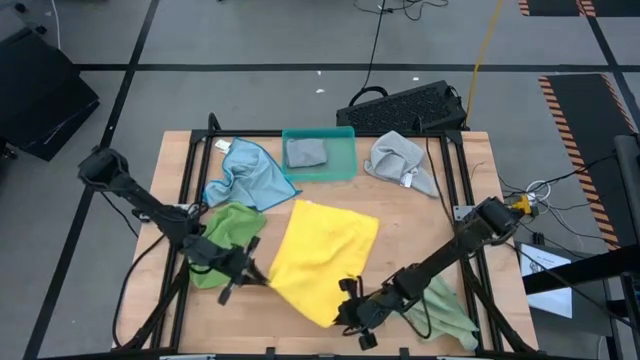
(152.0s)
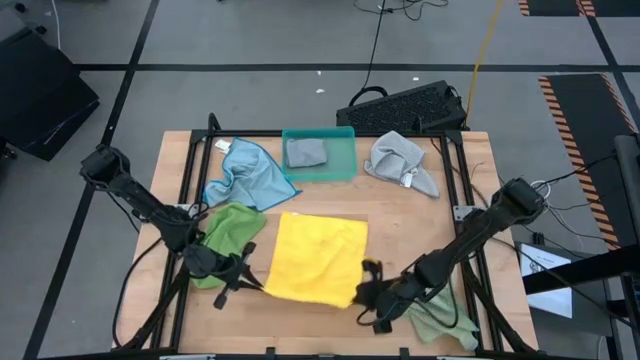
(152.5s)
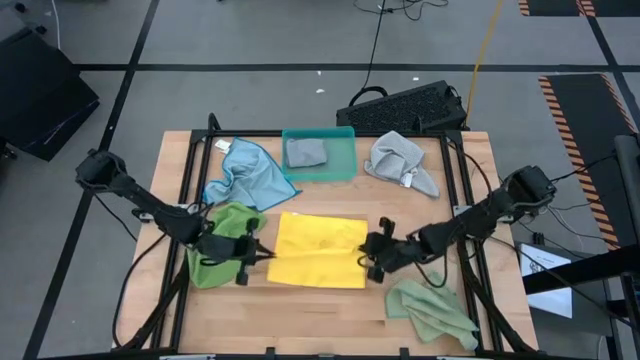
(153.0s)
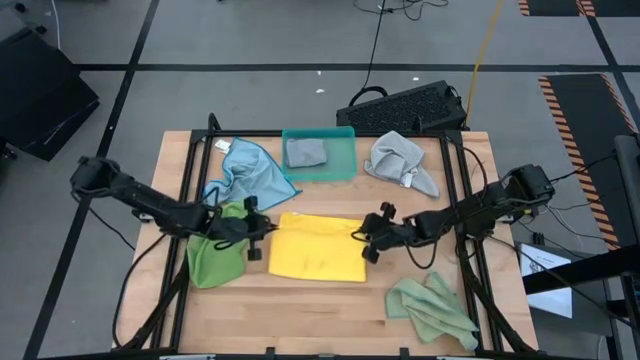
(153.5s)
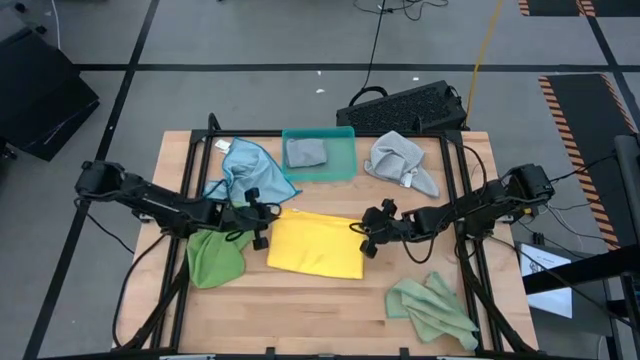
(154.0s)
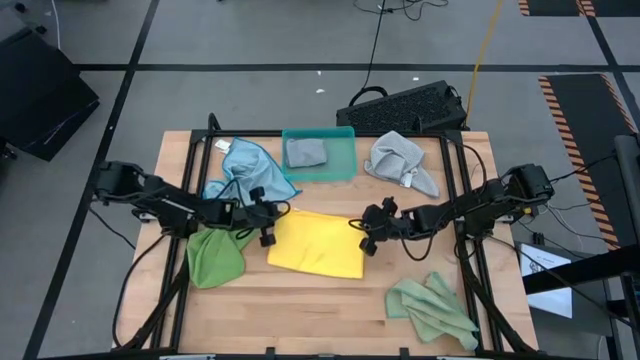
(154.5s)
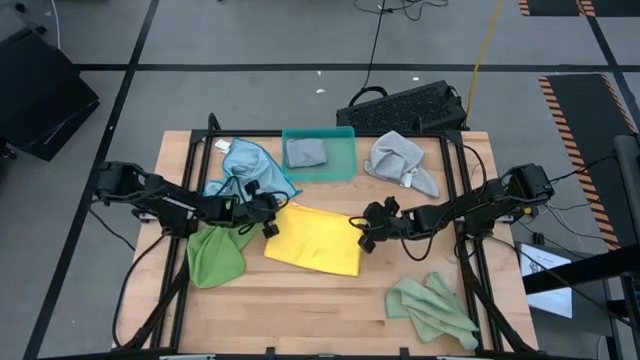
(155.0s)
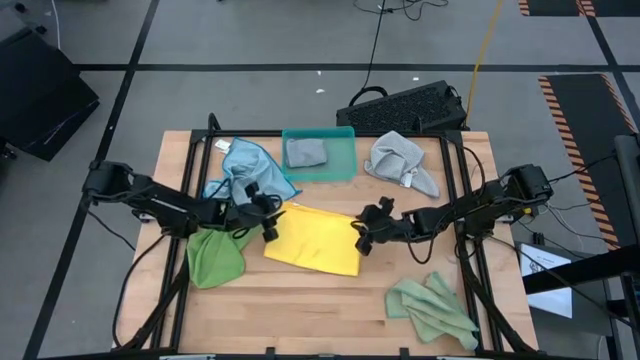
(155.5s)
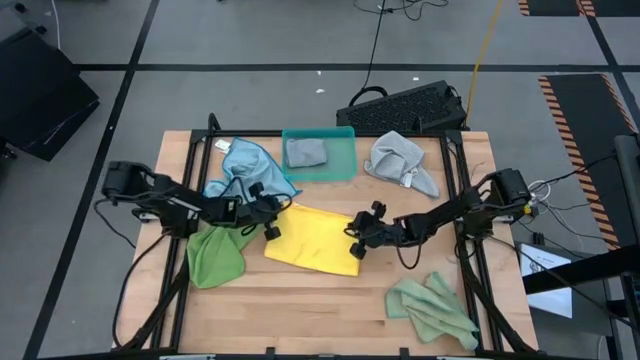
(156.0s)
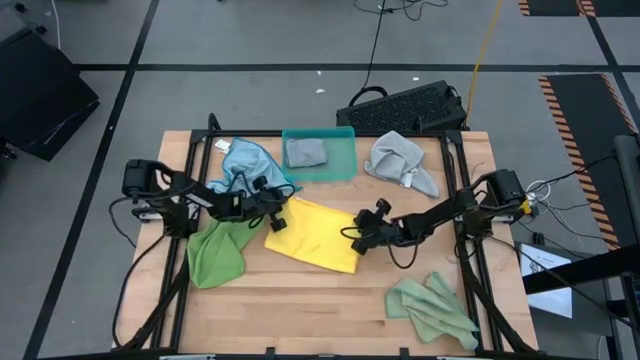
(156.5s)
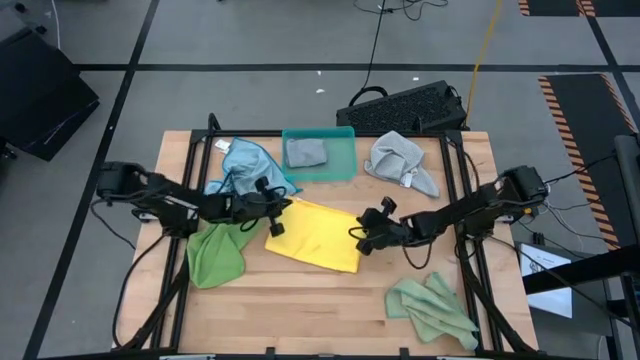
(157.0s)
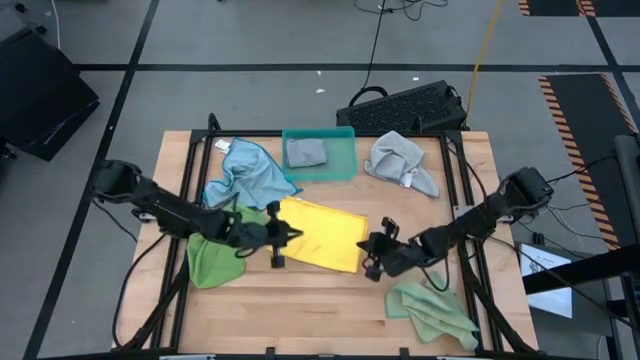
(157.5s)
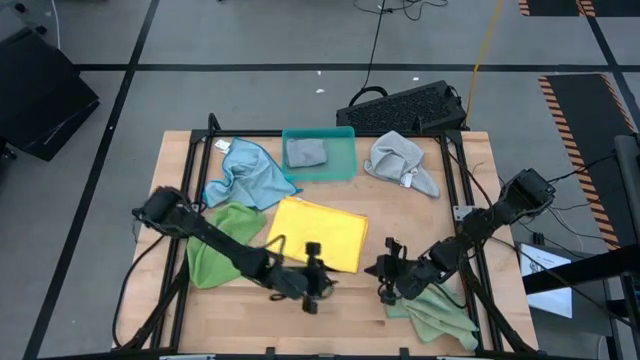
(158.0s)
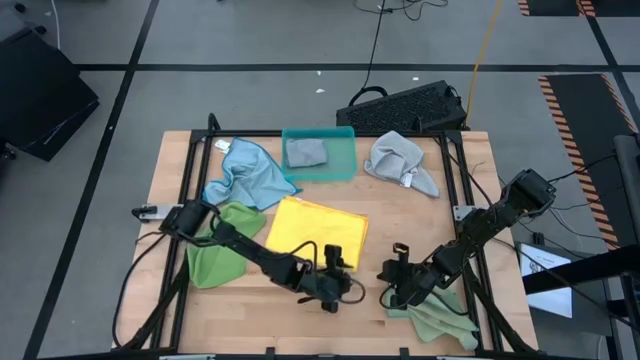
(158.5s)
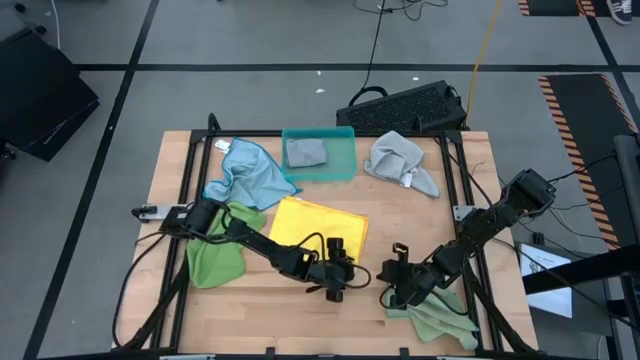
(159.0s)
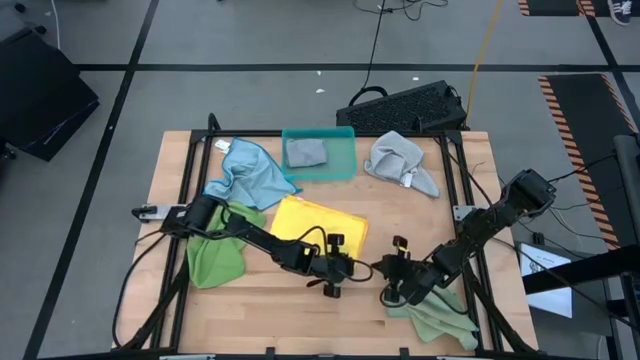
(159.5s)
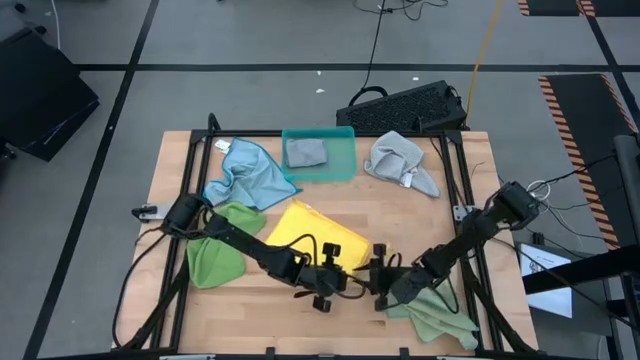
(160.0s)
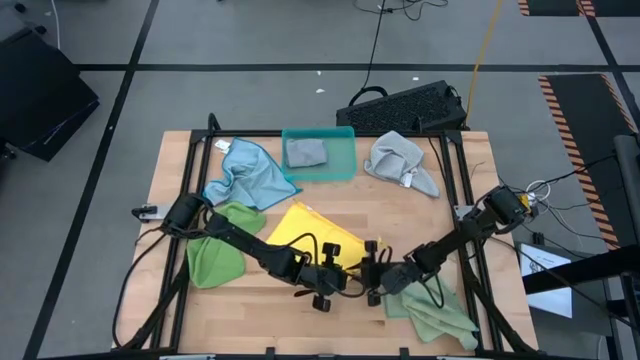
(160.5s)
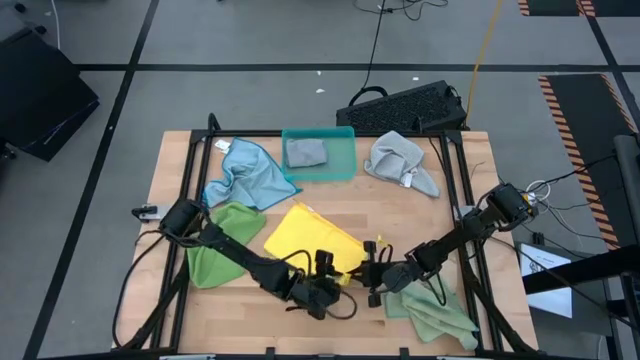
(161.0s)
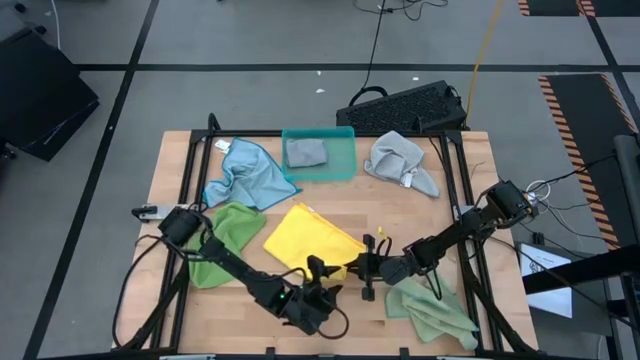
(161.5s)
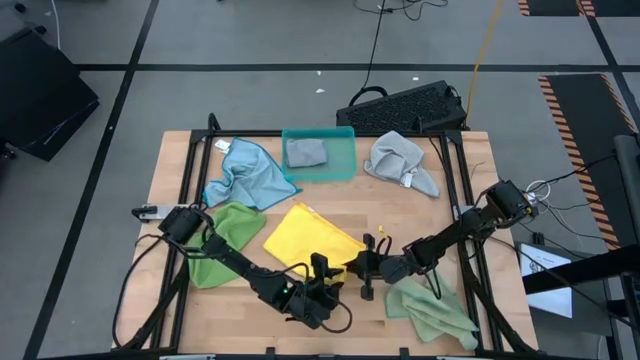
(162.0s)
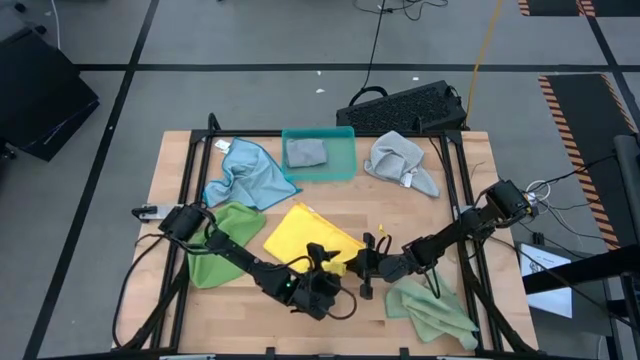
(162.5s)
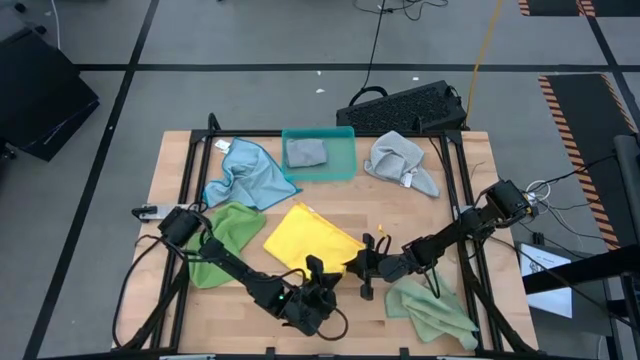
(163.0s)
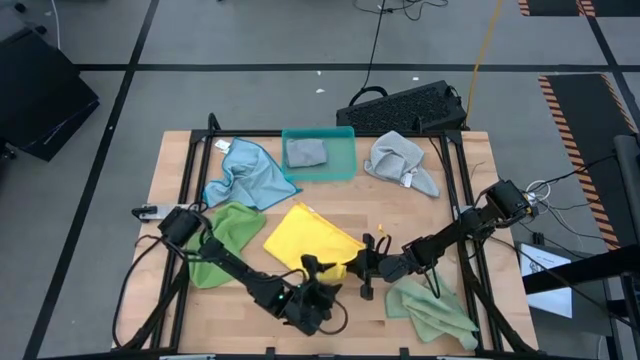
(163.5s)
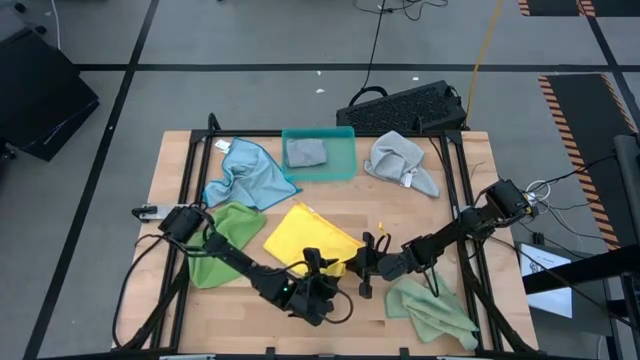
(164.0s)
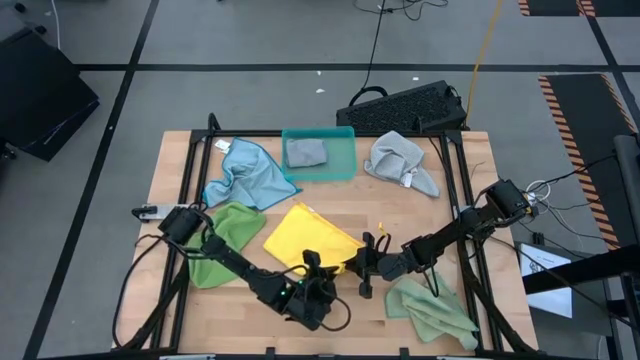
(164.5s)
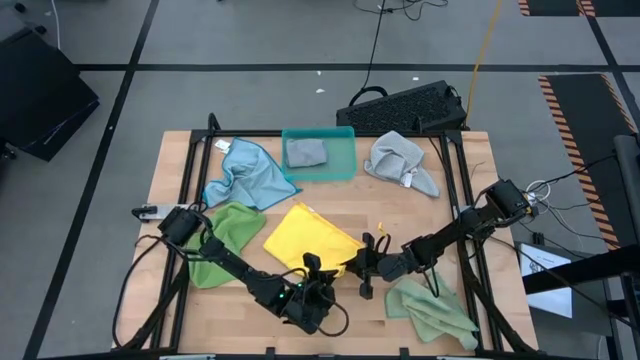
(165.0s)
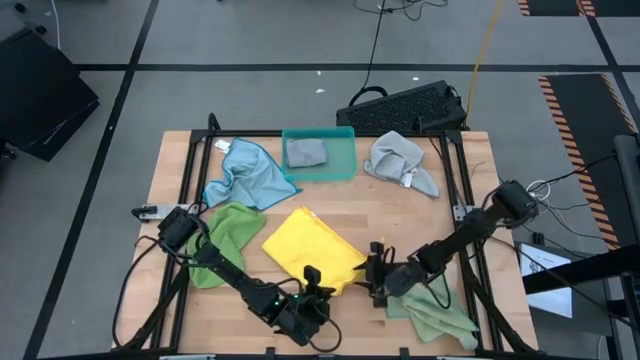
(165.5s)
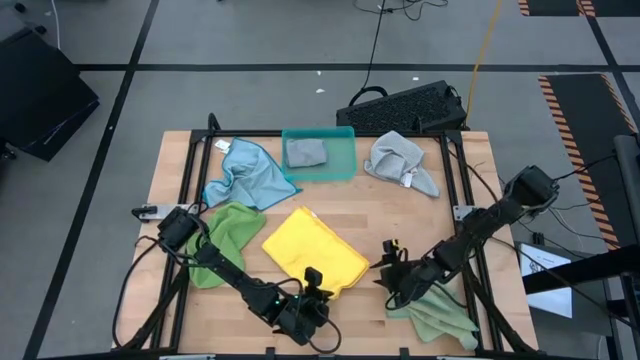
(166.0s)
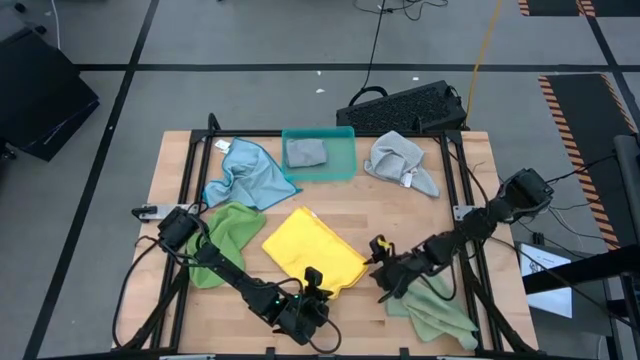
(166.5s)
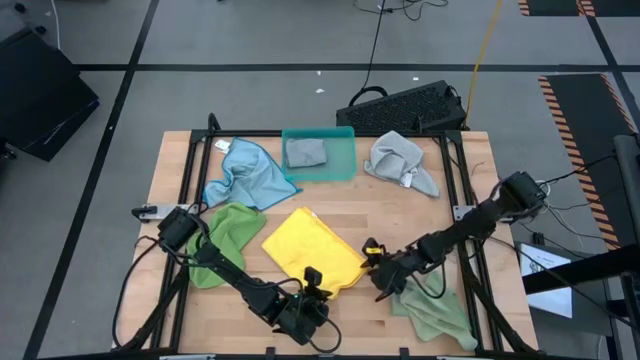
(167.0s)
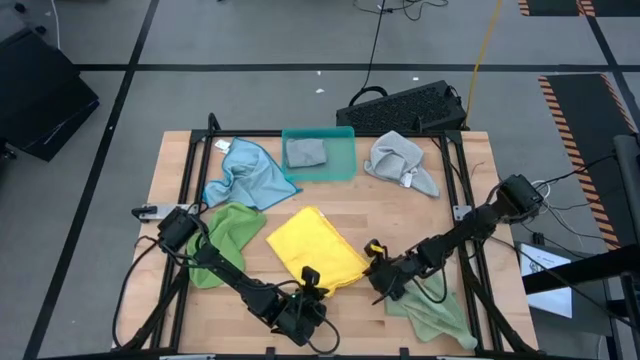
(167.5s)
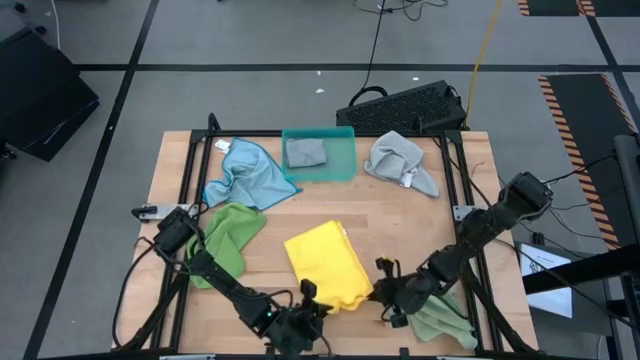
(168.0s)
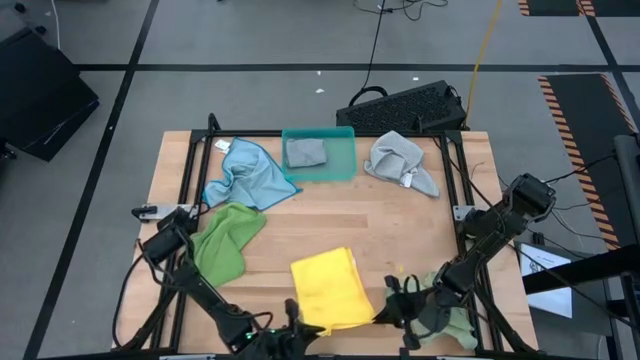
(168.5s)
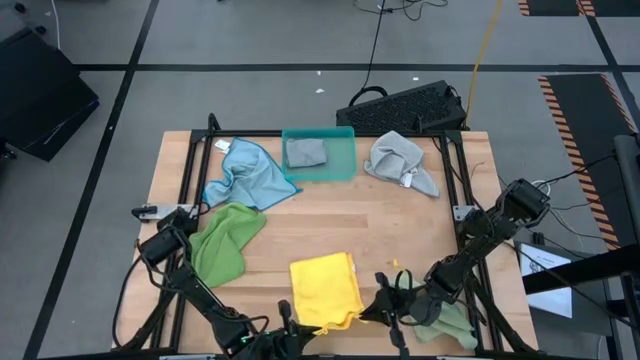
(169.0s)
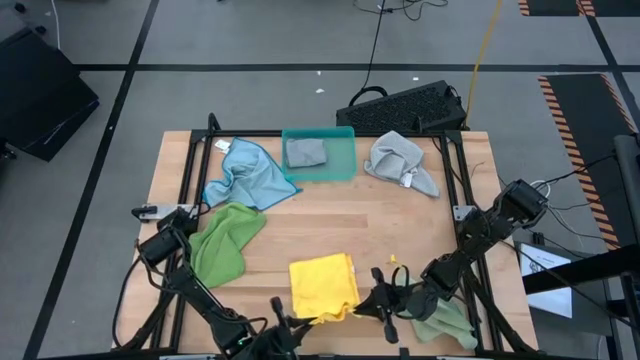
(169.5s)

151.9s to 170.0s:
Task: Fold microfiber towels
Fold the yellow microfiber cloth

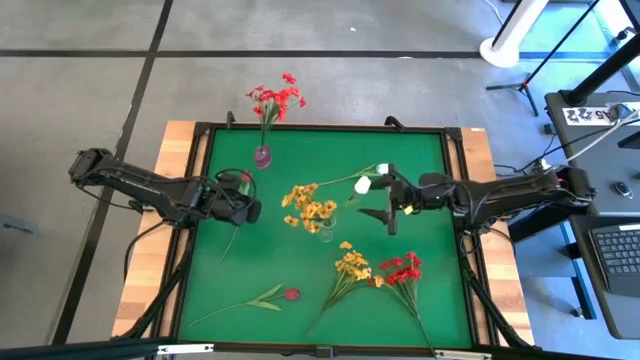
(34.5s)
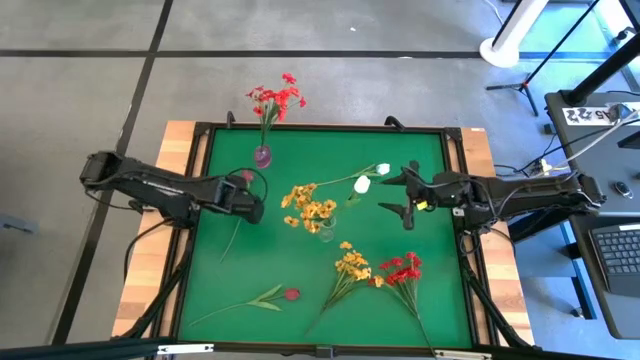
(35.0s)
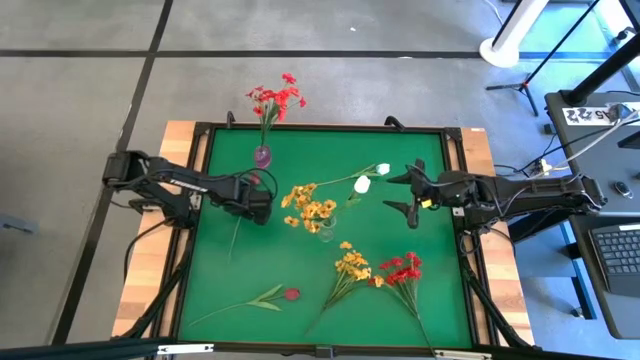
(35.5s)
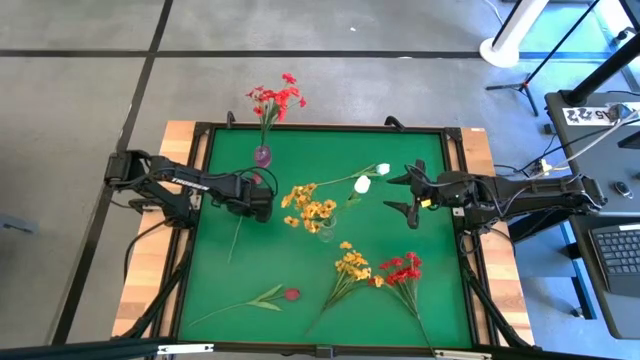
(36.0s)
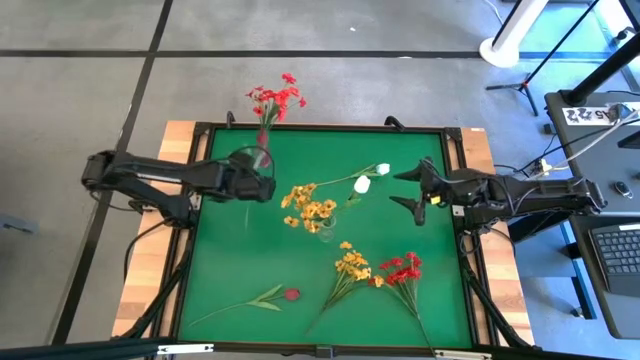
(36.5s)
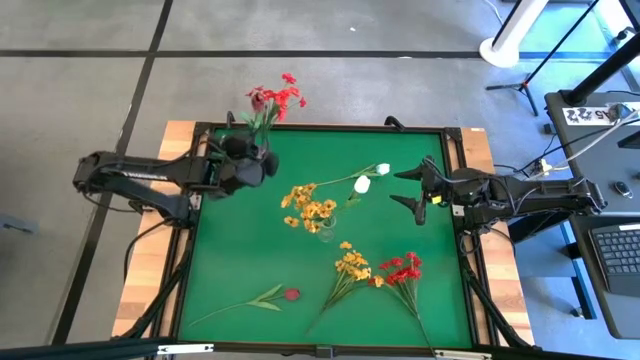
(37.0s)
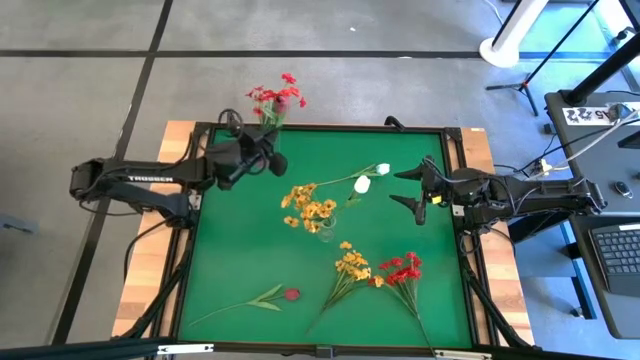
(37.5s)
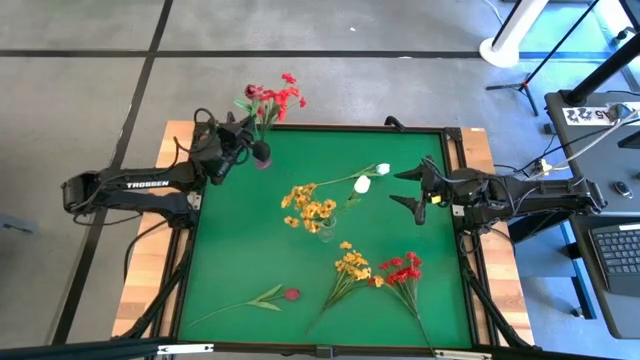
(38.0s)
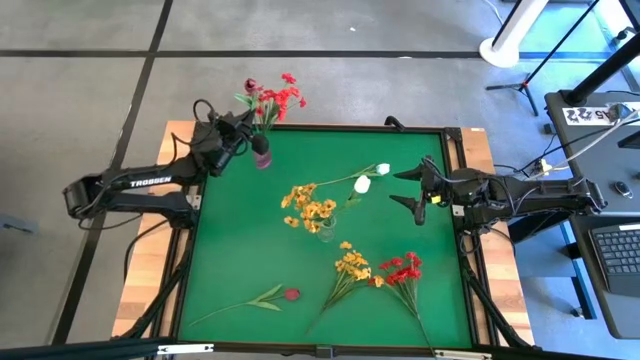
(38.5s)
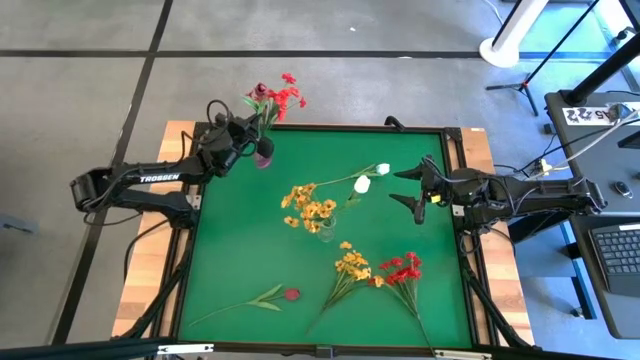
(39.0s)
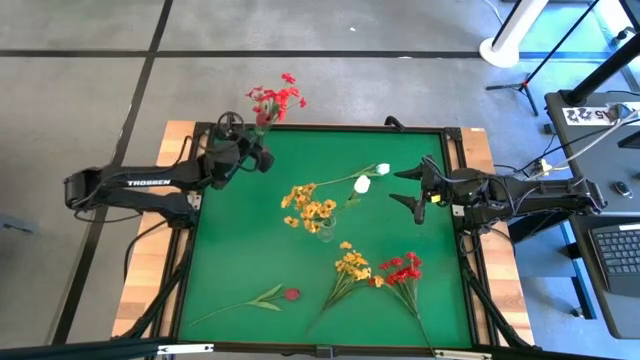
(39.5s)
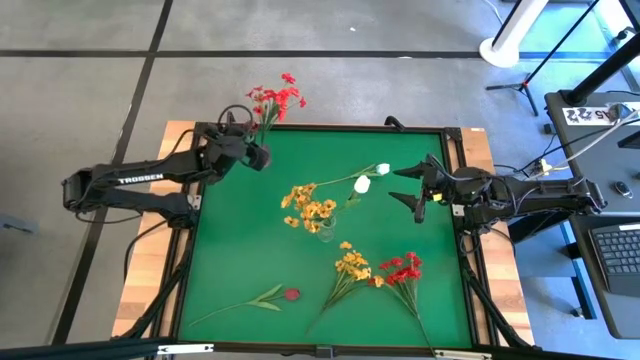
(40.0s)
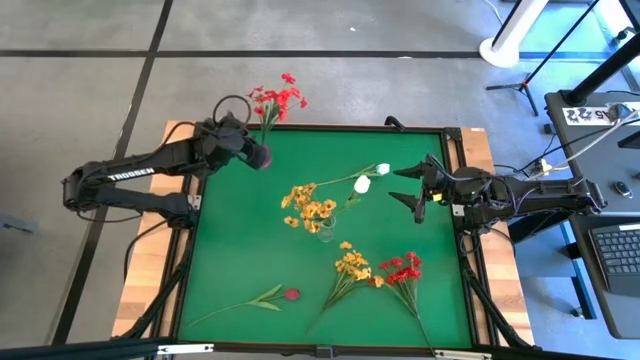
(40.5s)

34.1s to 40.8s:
Task: Sort flowers into vase by color
Put the top red flower into the violet vase
